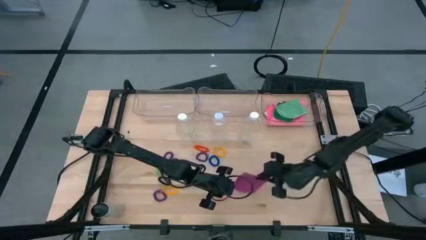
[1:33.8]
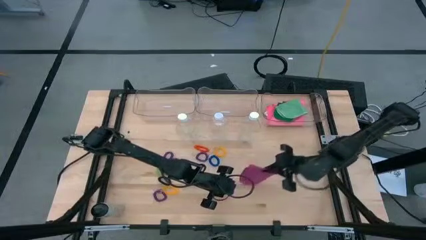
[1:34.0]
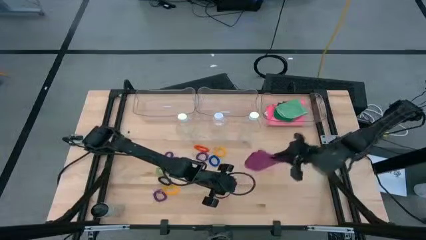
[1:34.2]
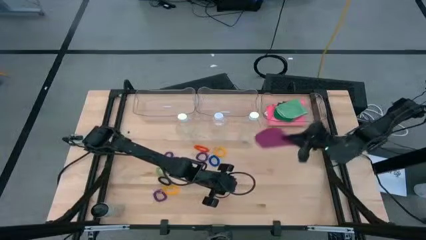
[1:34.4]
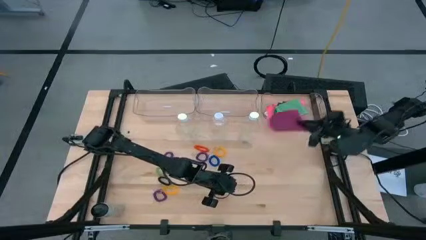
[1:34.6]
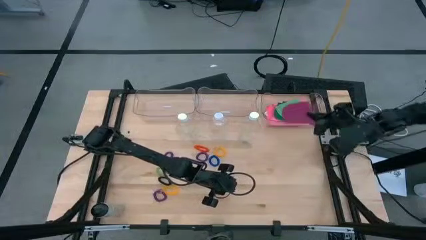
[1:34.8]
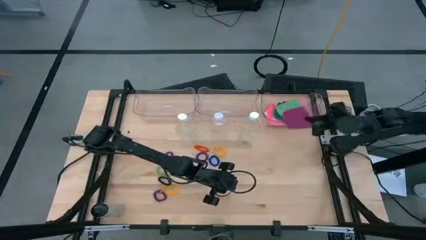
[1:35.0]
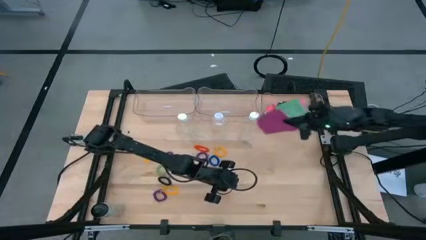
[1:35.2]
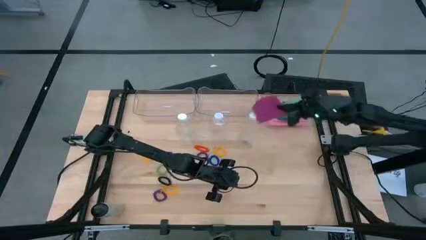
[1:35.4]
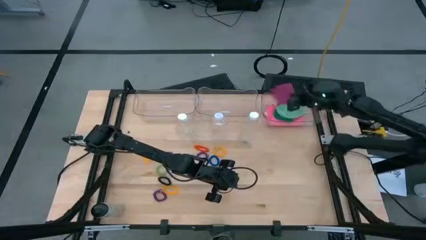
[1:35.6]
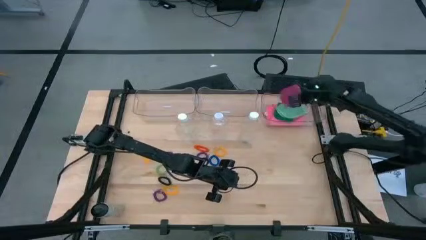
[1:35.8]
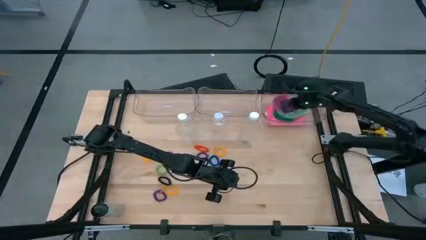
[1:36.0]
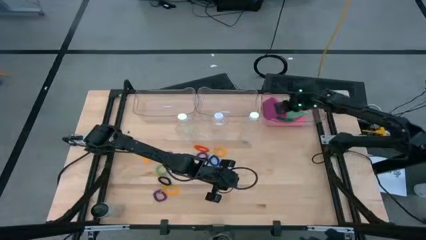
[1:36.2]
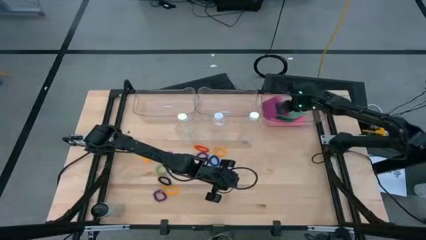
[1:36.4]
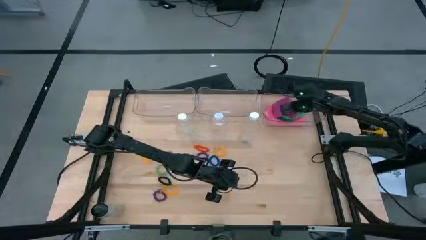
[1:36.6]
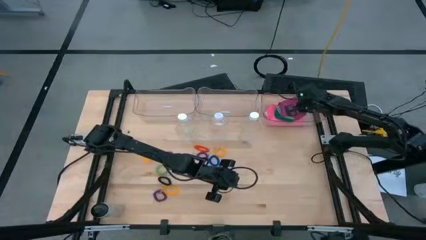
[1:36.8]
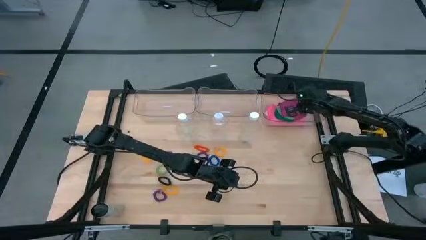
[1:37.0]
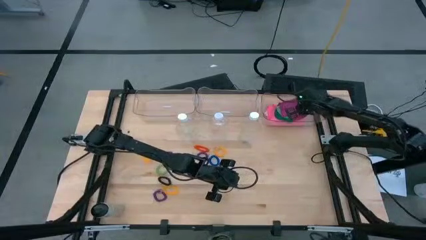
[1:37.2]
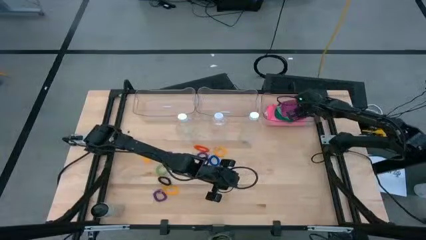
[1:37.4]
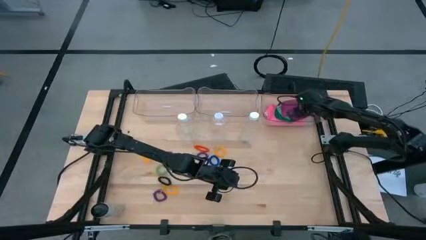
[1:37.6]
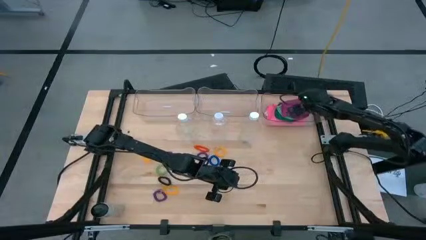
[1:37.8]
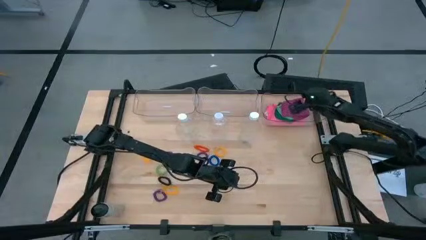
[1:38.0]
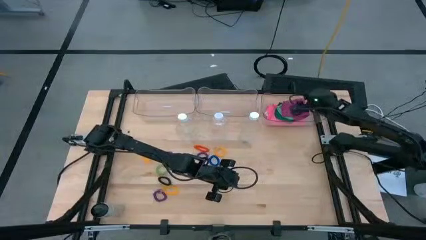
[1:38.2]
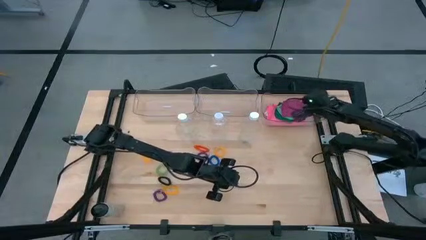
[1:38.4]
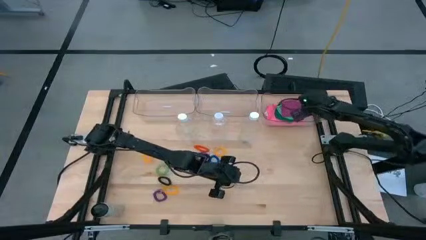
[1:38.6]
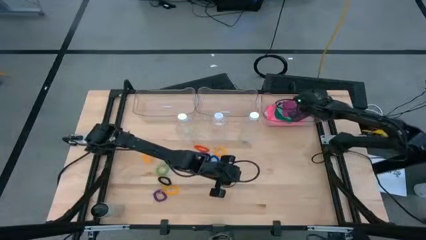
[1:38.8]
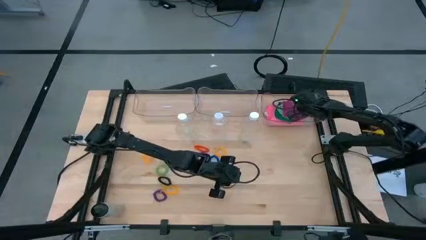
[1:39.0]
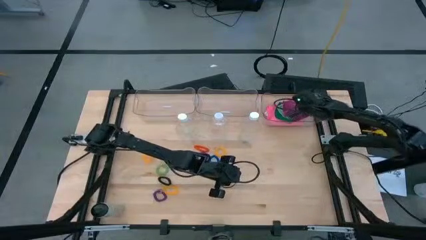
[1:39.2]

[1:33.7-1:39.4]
Task: Pick & Place Sports Items
Put the violet microfiber towel into the right transparent bin

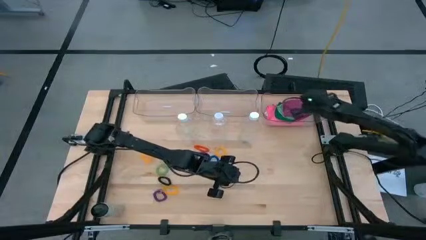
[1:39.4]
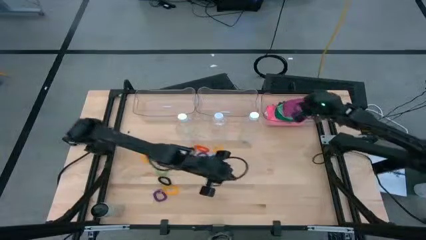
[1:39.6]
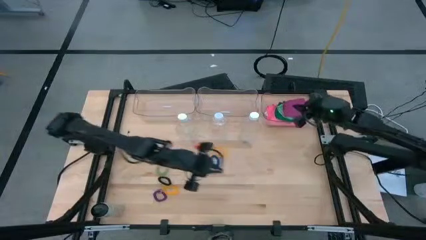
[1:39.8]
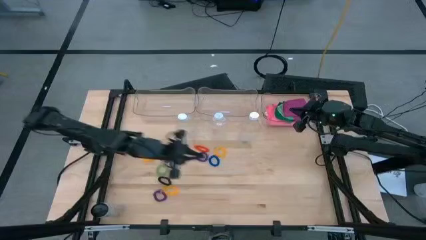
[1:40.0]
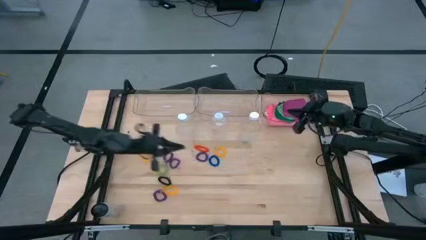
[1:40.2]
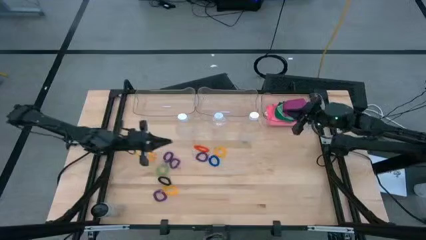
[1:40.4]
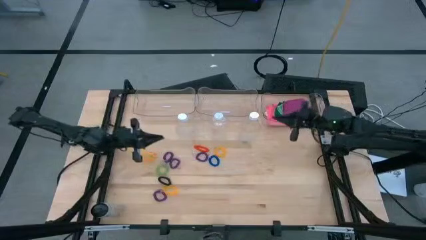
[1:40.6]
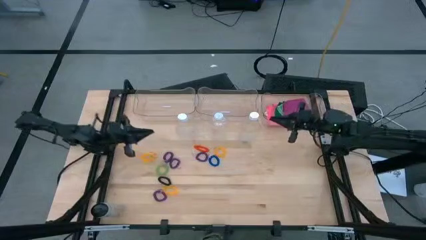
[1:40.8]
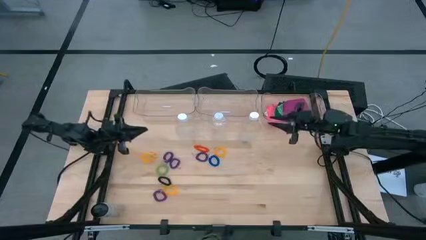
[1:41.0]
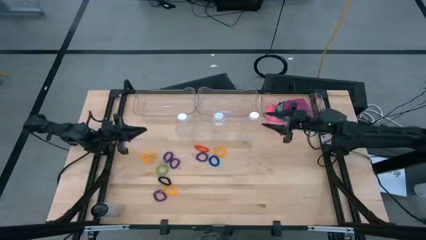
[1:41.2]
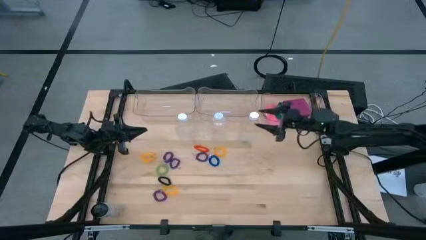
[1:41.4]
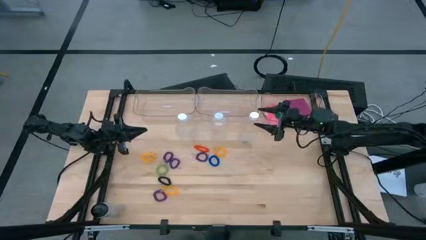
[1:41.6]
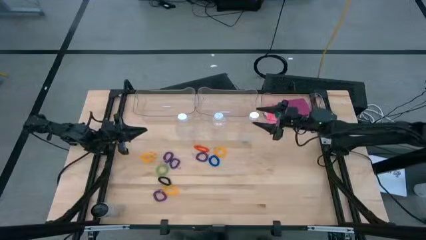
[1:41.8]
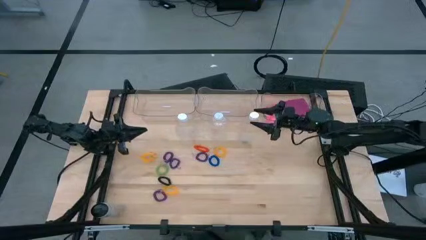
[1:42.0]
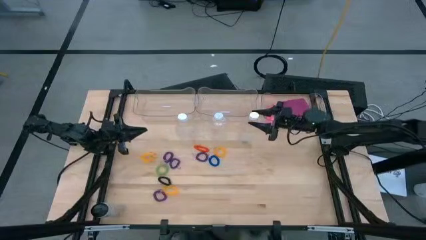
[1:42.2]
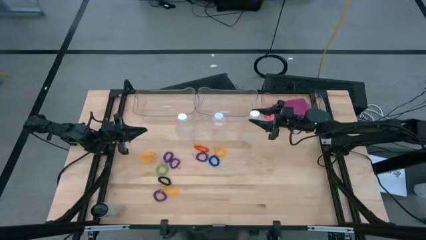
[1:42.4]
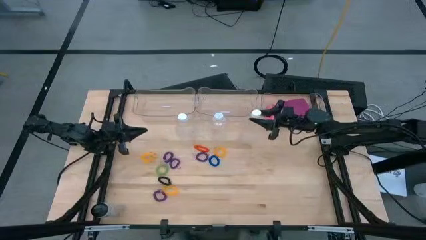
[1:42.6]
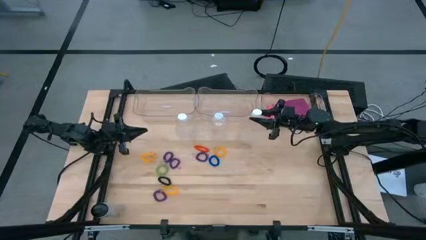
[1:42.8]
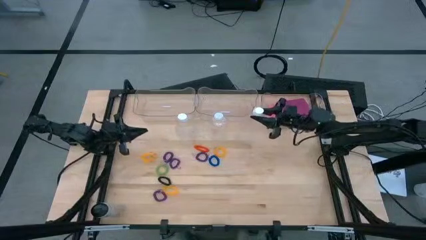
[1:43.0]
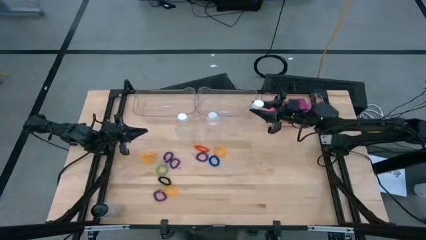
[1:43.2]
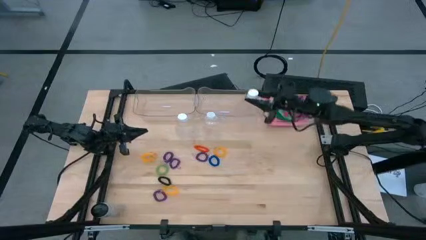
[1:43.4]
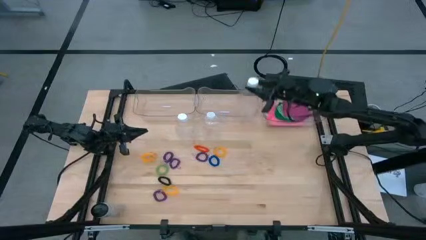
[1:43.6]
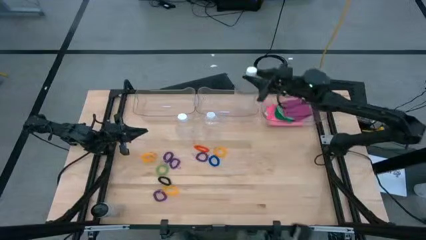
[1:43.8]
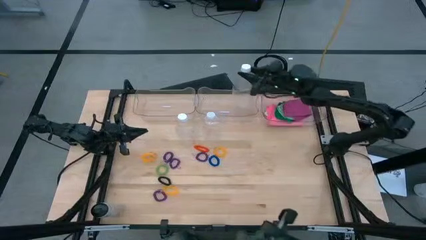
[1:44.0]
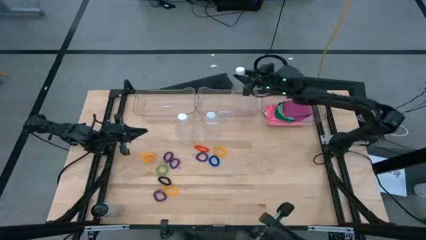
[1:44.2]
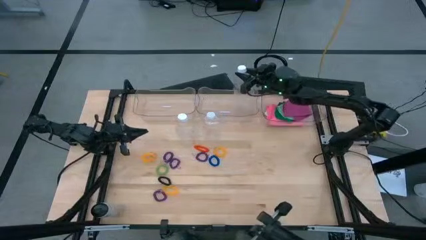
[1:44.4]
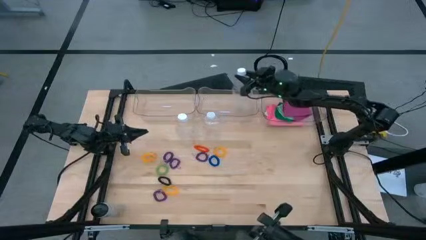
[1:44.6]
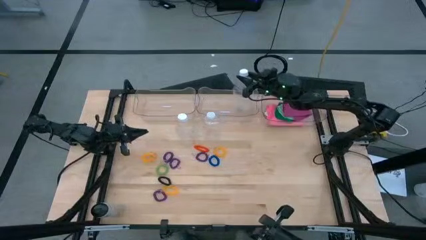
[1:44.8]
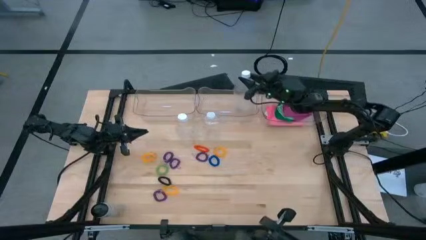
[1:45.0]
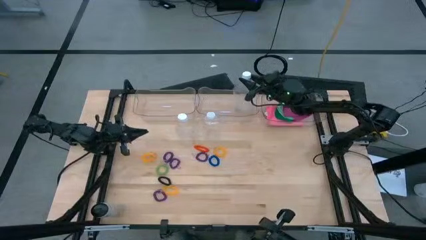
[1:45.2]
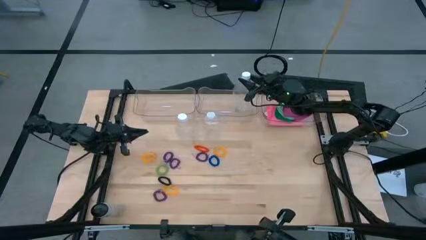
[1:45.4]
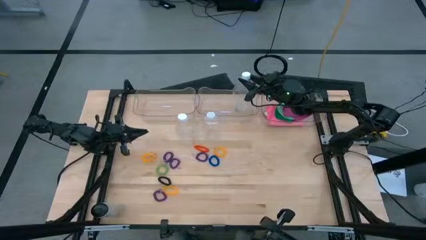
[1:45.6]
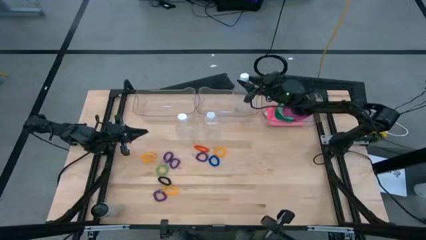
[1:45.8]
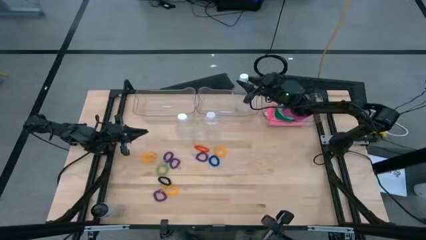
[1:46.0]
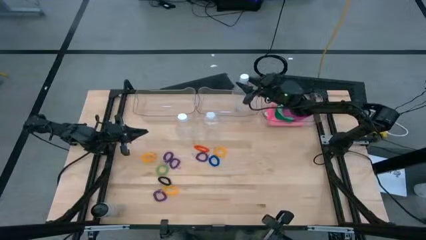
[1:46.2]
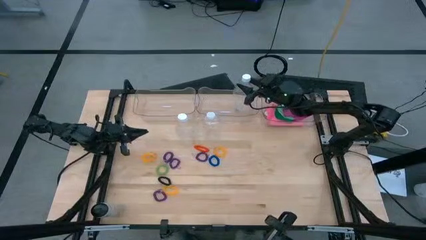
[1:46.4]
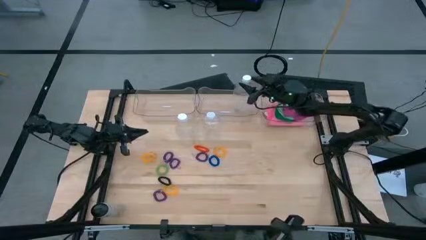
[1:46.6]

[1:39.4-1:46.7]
Put the right plastic bottle into the middle transparent bin
